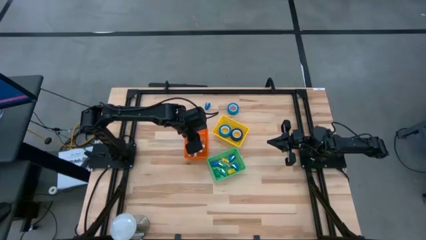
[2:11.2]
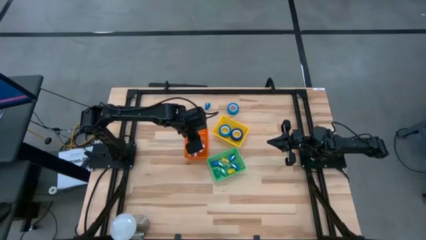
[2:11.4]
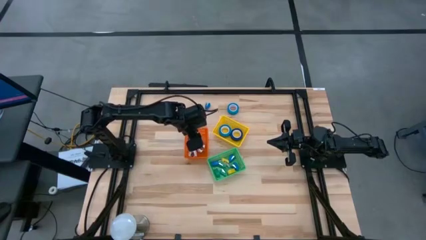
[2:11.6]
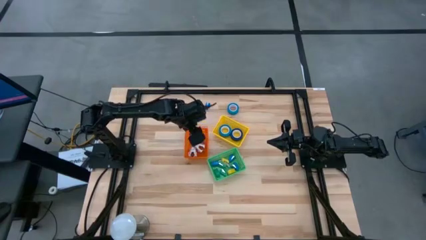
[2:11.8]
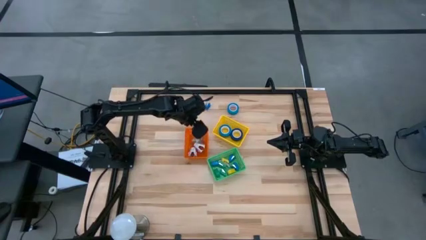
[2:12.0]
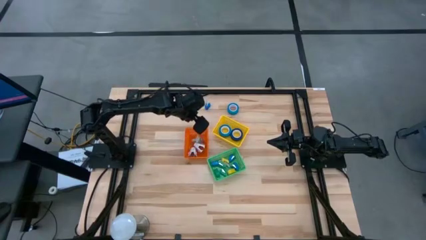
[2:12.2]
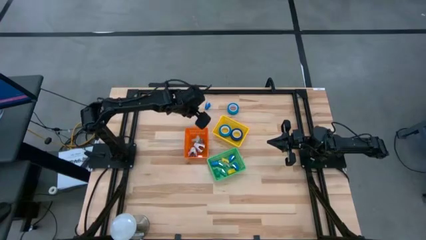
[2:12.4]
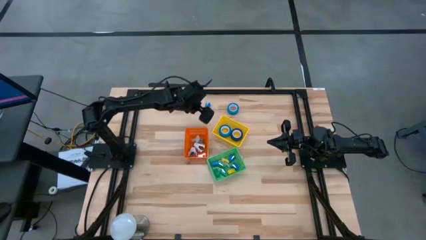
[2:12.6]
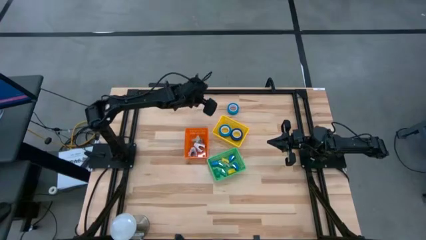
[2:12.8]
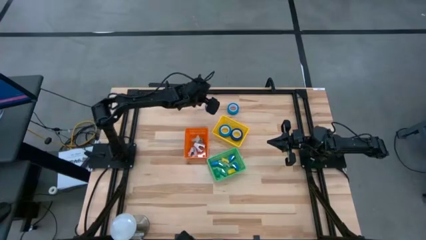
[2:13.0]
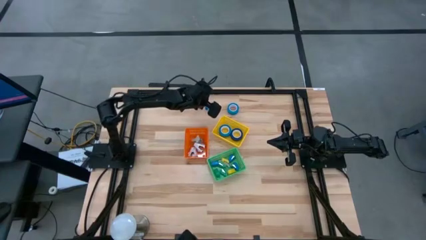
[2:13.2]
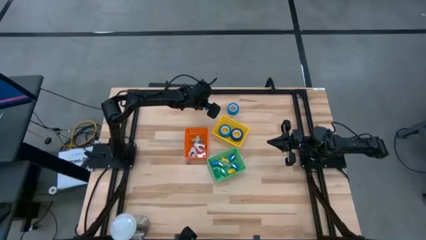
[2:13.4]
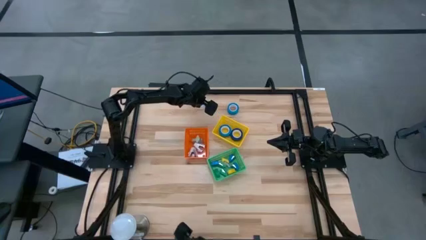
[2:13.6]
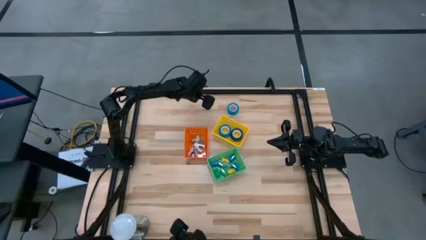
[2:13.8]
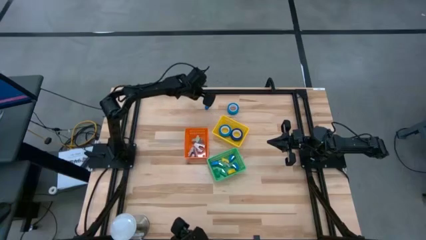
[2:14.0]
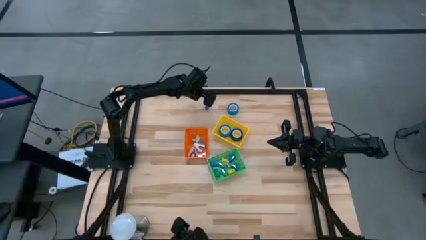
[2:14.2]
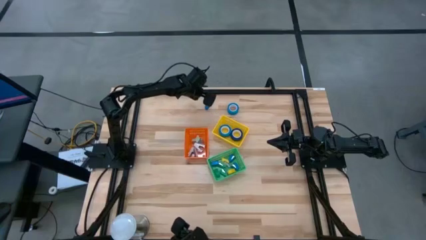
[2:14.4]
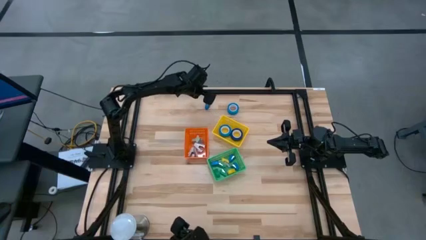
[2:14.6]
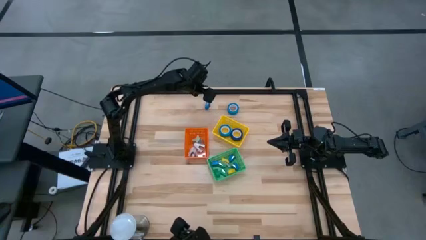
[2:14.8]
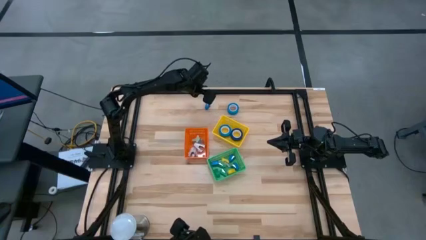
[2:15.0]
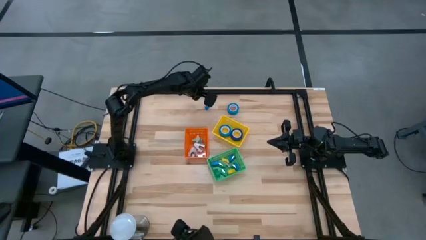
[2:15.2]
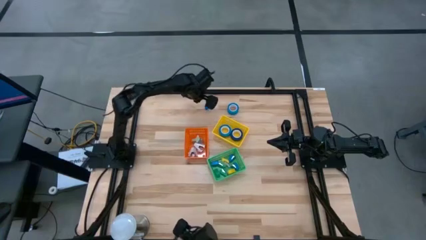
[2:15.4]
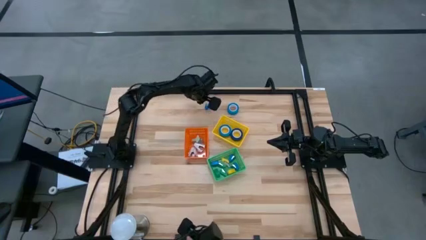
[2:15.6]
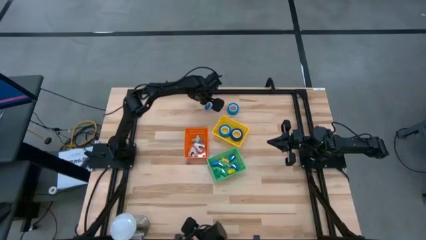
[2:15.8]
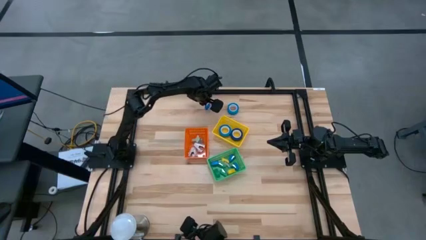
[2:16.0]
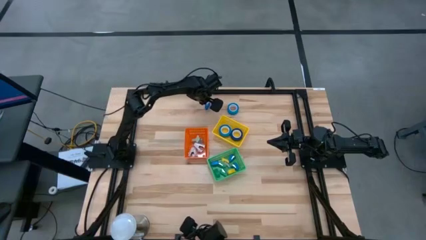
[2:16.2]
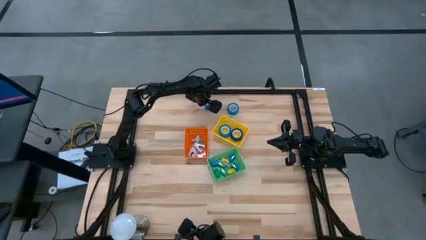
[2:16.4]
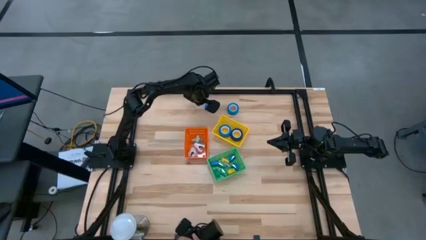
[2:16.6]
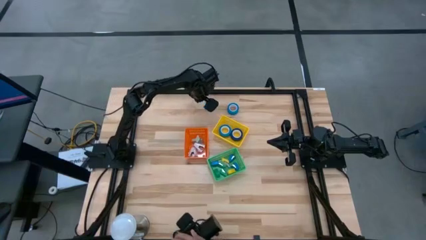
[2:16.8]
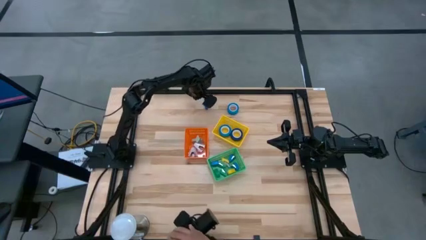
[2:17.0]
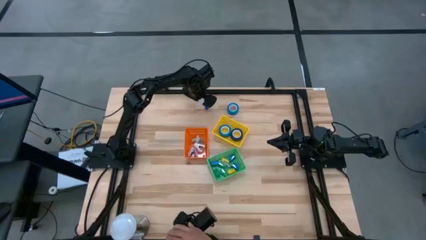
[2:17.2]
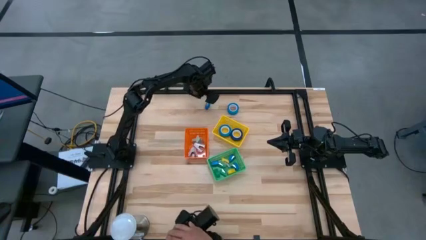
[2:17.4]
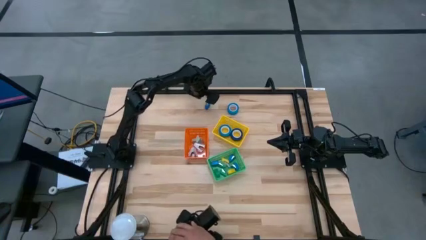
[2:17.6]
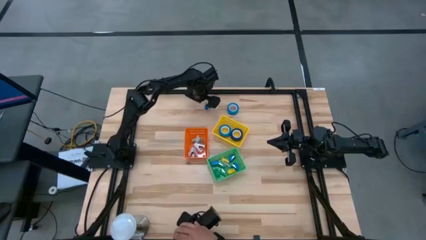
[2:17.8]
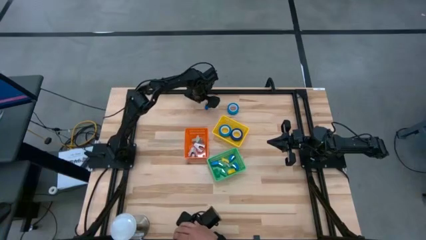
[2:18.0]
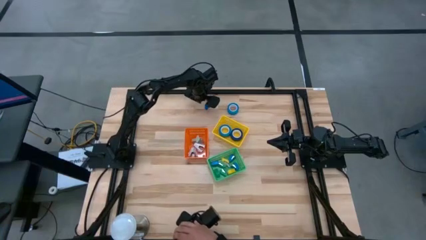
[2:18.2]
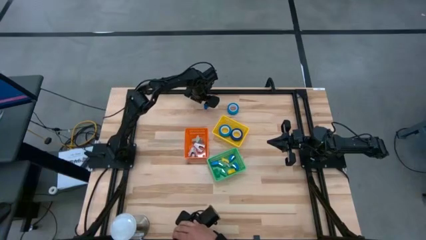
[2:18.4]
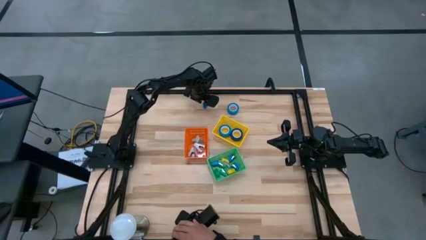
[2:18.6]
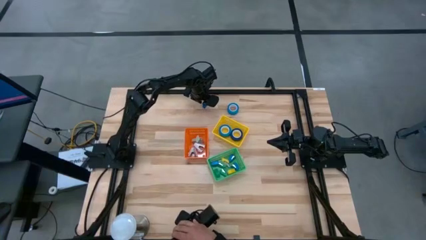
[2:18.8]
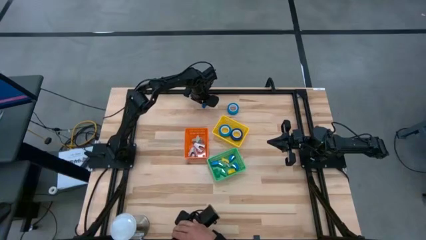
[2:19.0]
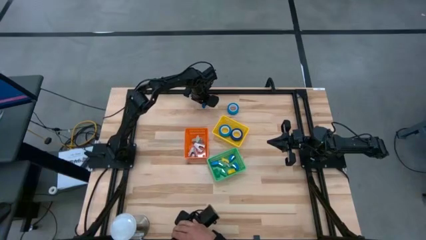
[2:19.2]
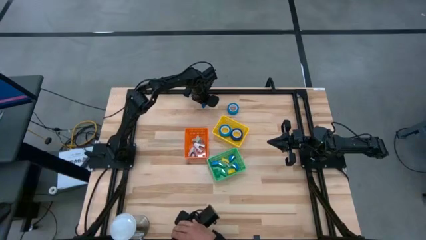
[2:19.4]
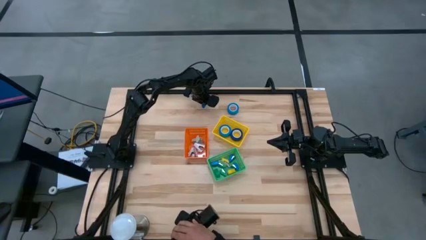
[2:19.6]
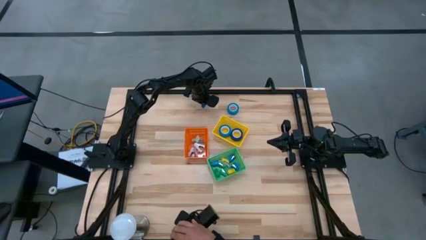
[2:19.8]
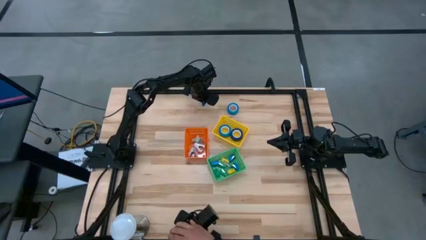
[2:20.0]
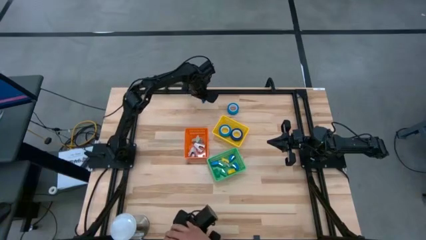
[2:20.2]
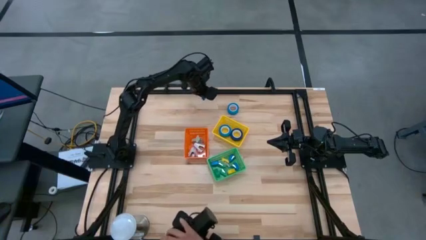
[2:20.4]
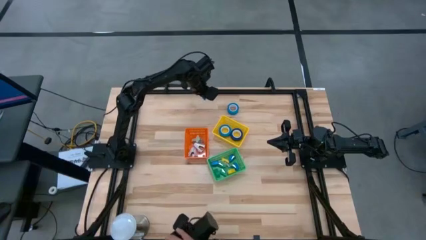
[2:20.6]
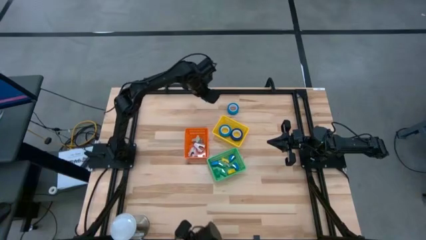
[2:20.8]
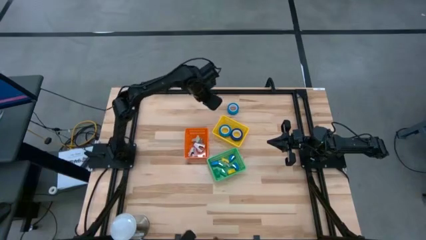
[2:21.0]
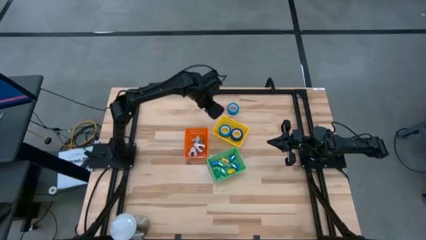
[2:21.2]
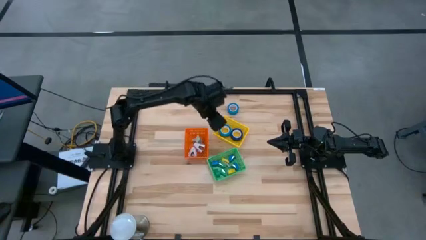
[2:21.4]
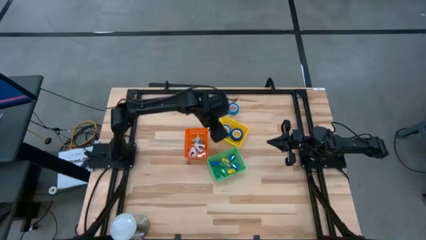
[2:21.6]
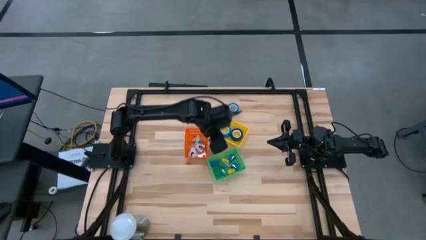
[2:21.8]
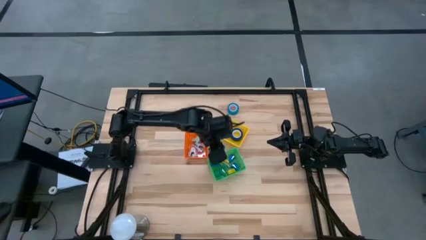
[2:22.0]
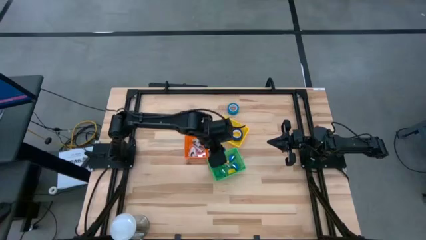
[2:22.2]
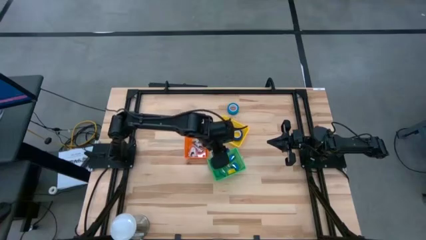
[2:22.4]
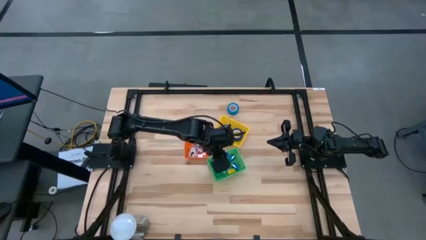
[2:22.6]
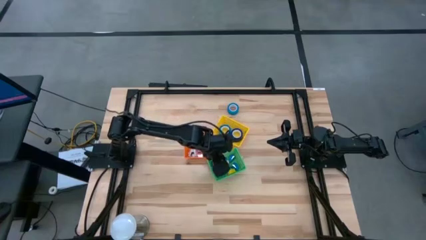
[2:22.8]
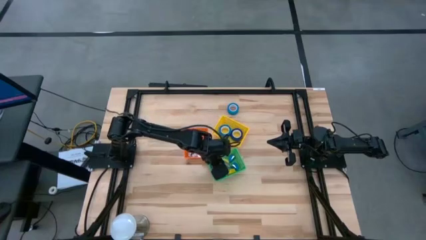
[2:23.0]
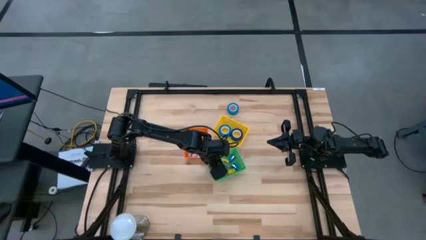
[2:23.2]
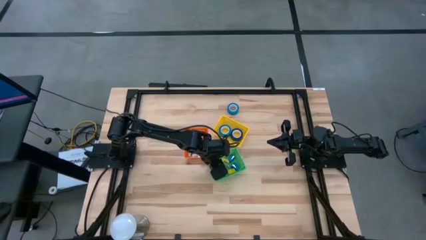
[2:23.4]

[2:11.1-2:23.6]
Task: Pick and place Stapler, Stapler remover, tape
Put the blue stapler into the green bin
